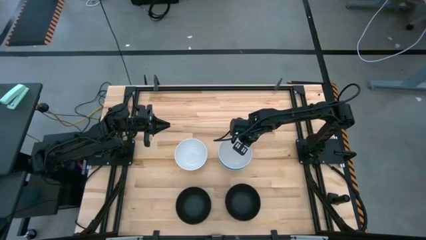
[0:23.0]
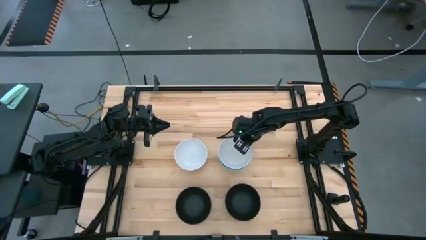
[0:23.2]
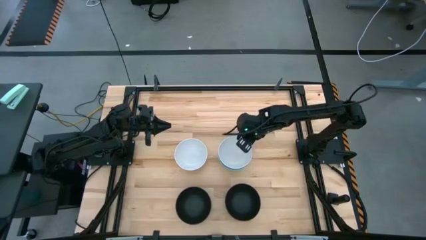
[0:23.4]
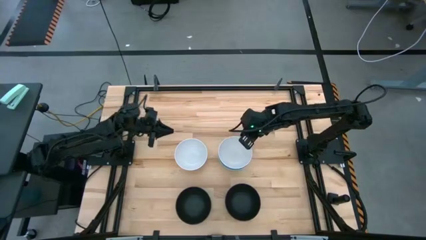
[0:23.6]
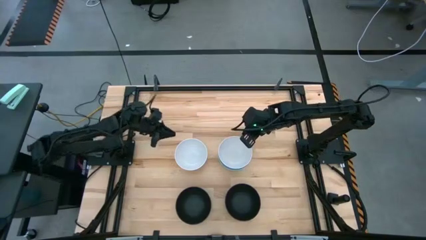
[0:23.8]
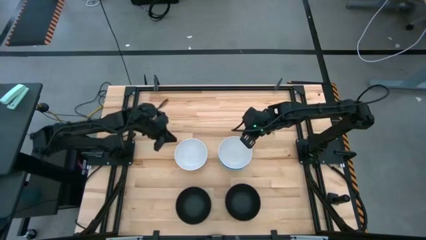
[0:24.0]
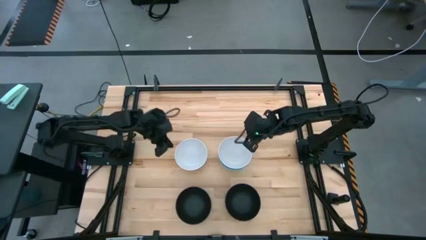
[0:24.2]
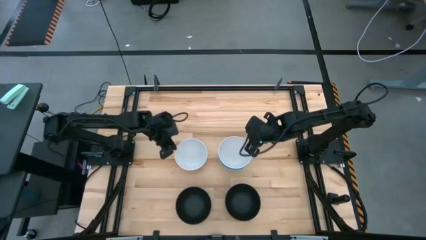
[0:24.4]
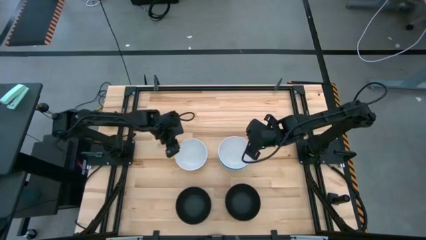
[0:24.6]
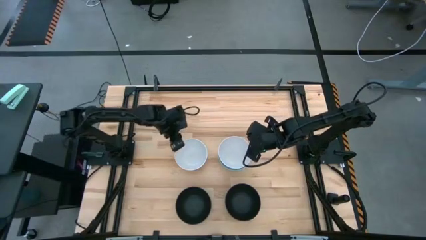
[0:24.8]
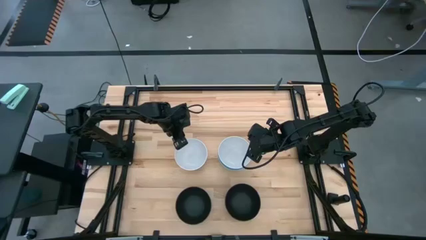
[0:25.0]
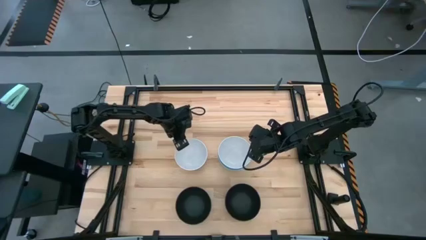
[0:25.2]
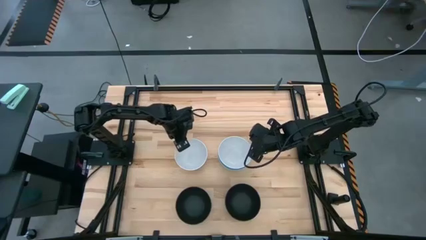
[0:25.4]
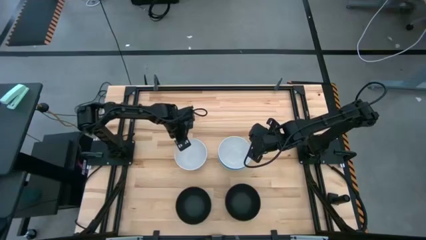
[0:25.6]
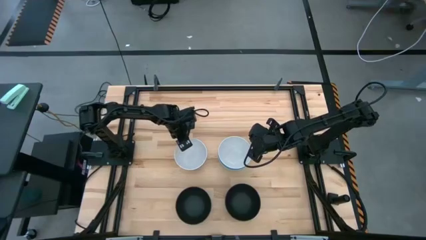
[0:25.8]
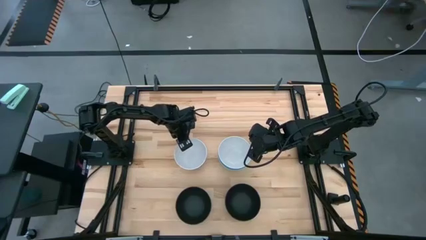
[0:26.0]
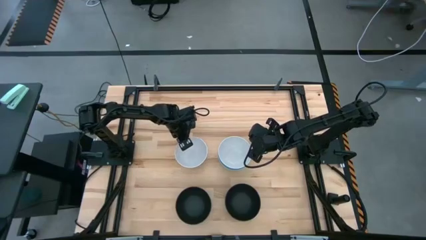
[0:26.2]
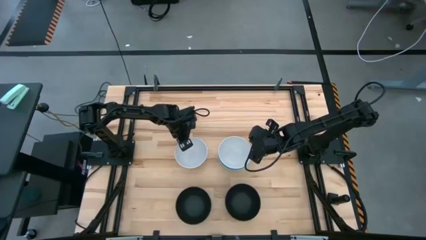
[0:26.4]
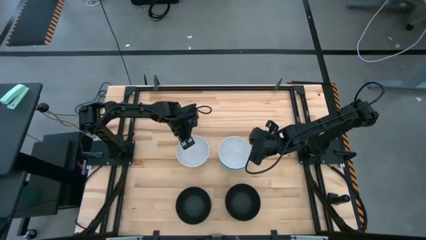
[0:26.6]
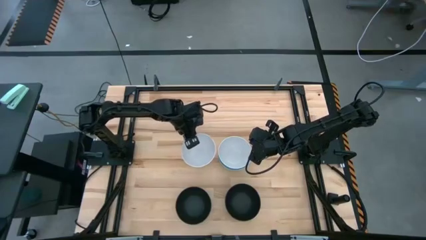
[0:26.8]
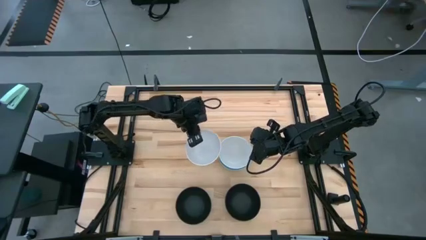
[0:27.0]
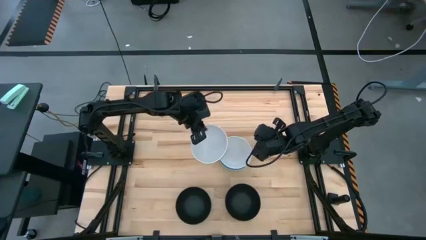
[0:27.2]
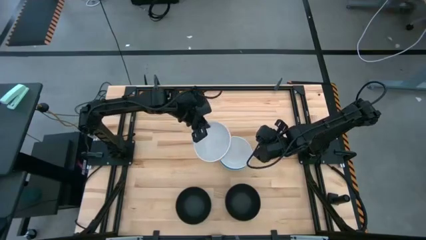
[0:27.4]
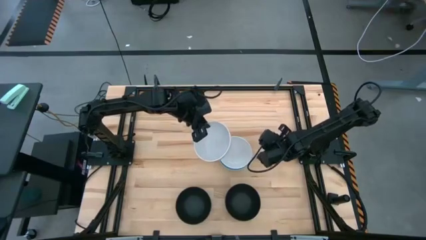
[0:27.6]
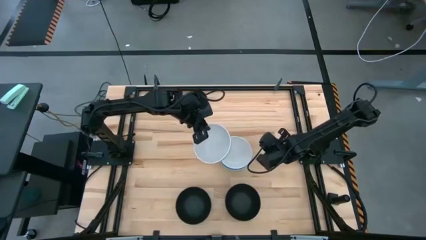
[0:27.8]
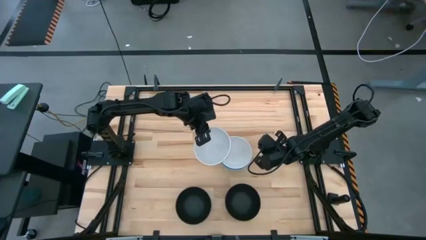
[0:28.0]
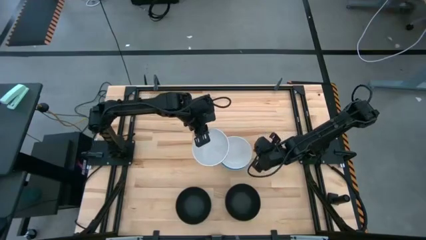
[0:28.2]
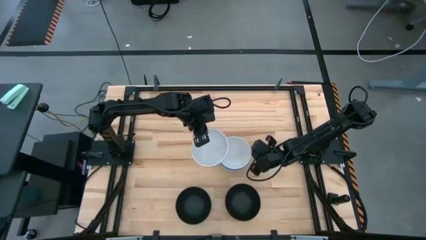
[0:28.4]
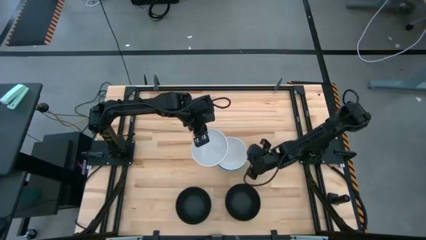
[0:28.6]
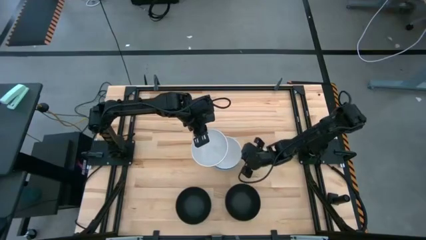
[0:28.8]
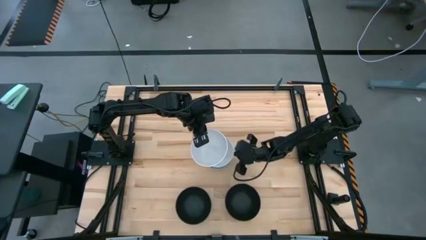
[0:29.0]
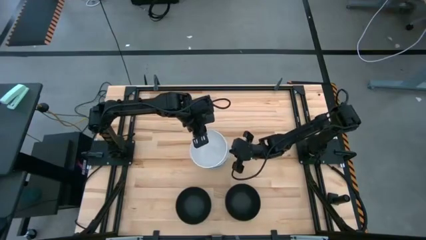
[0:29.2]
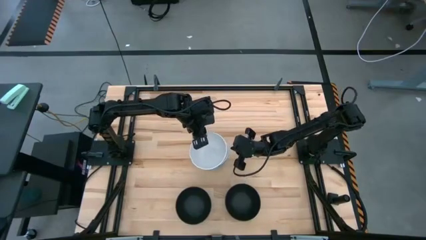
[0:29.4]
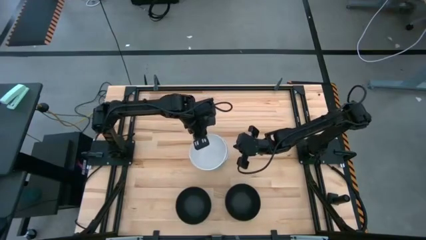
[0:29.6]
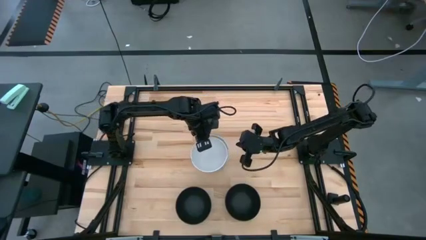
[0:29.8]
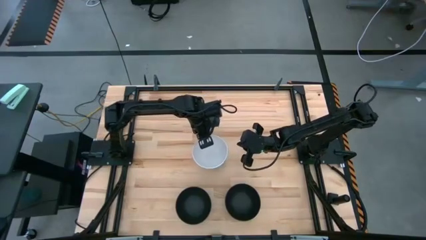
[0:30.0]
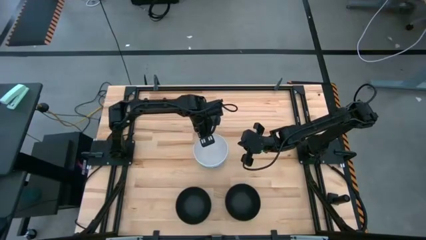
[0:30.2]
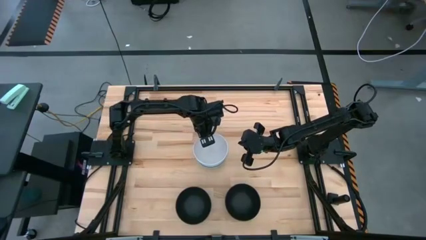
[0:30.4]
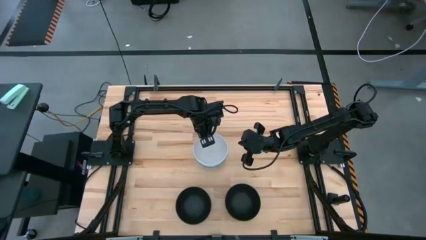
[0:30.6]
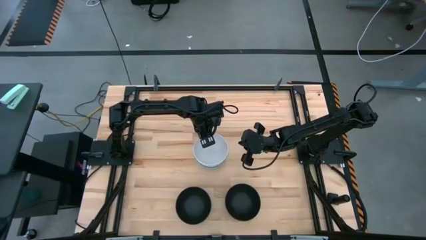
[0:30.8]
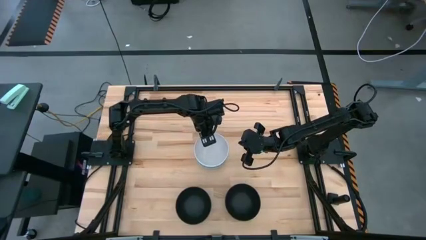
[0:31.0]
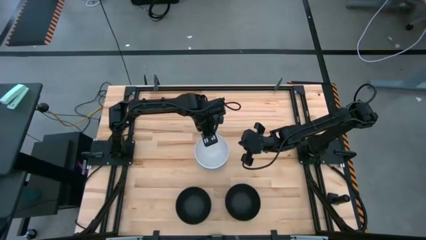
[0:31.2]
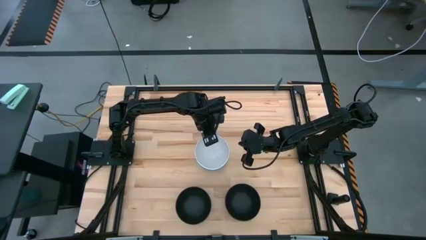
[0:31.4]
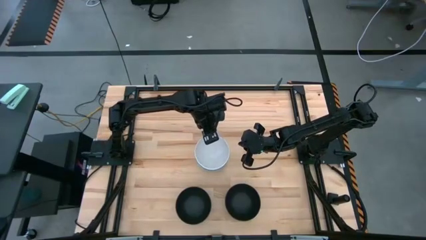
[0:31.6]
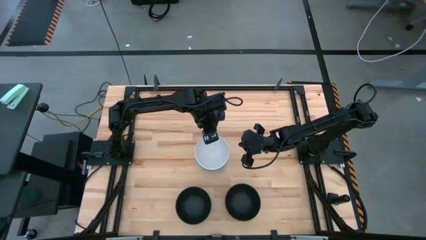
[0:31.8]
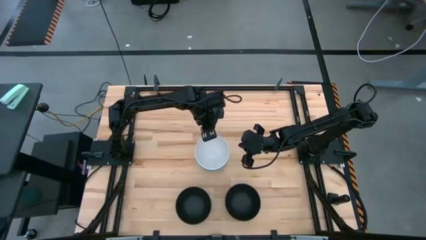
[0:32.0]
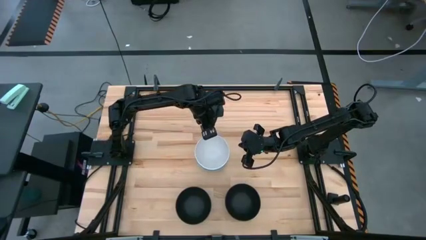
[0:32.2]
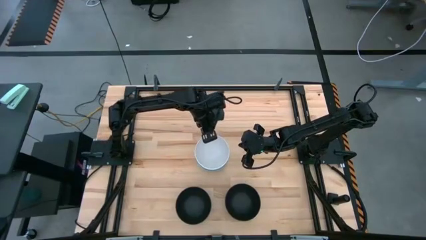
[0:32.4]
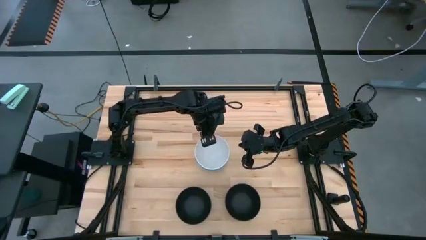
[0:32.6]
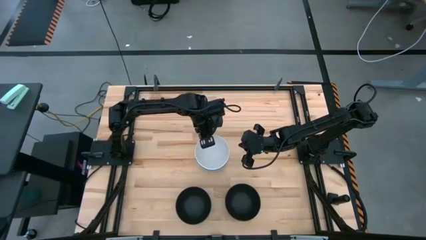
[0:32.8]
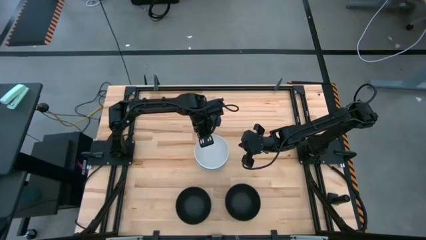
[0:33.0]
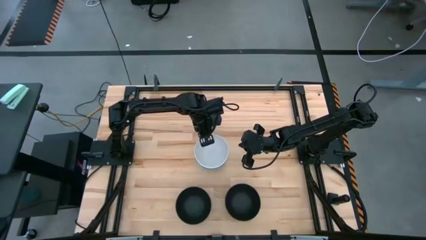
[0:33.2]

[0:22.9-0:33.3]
Task: Nest bowls inside each other
Stack the white bowl on the stacked white bowl

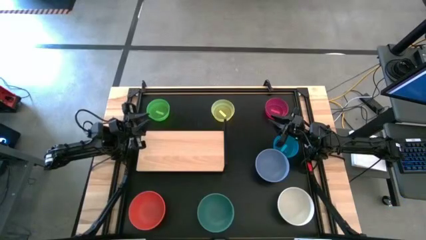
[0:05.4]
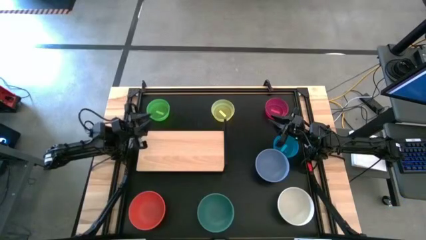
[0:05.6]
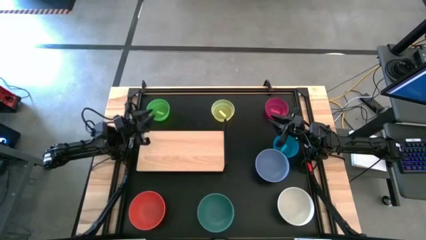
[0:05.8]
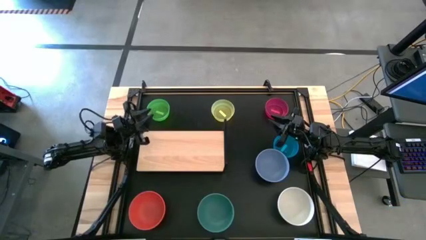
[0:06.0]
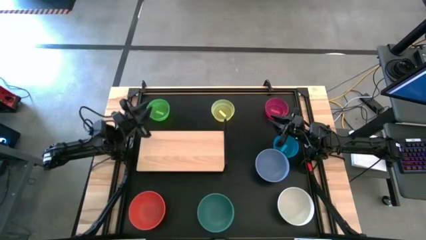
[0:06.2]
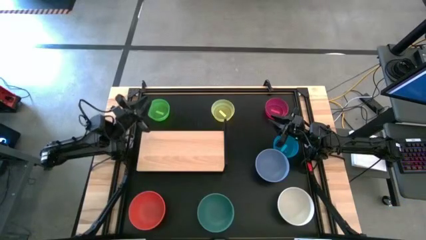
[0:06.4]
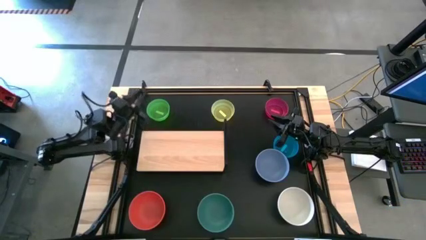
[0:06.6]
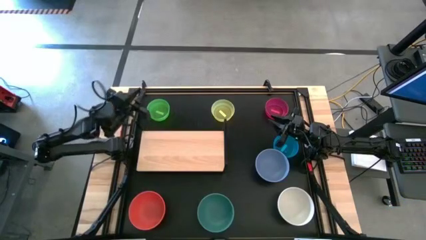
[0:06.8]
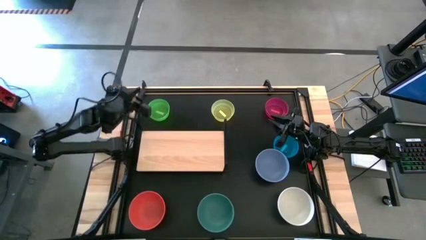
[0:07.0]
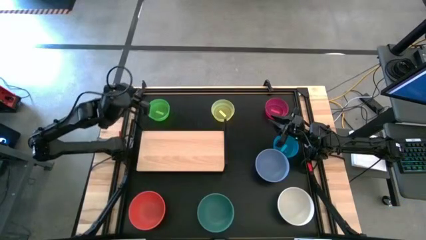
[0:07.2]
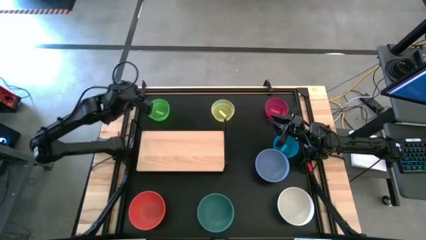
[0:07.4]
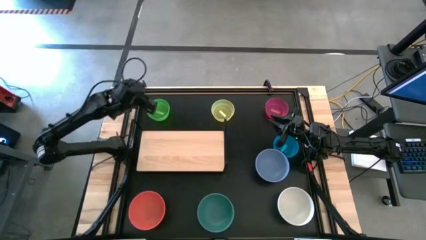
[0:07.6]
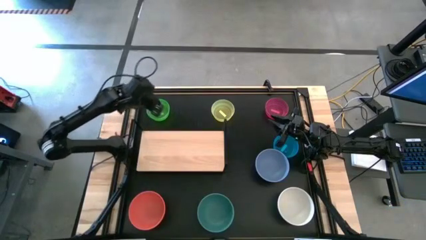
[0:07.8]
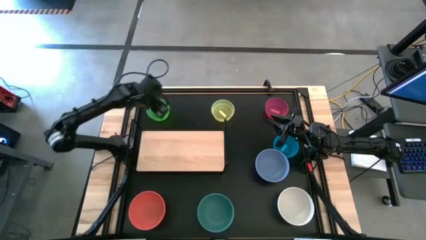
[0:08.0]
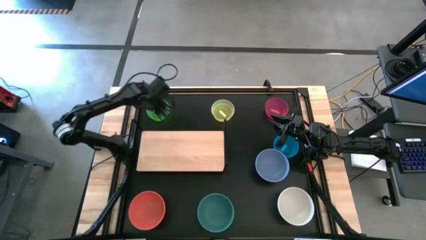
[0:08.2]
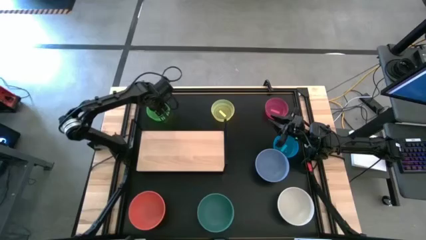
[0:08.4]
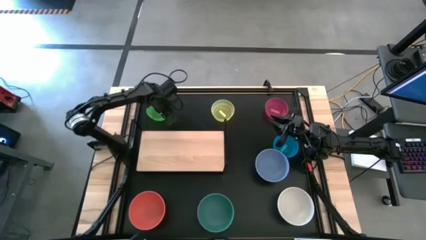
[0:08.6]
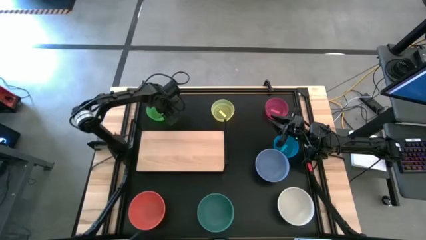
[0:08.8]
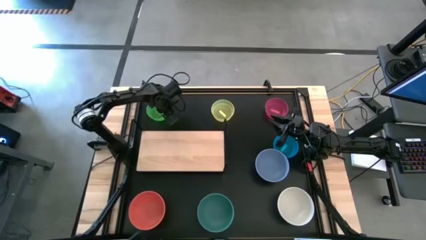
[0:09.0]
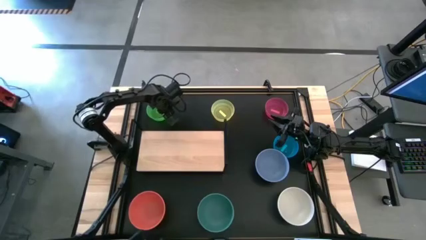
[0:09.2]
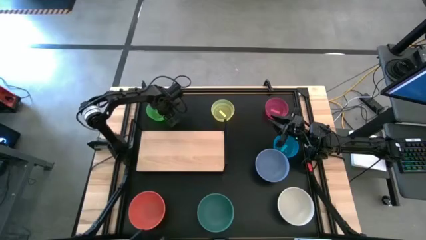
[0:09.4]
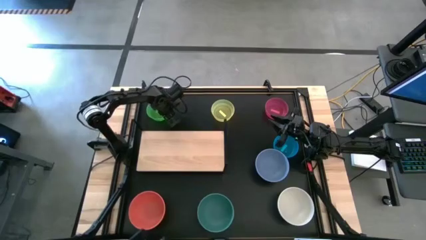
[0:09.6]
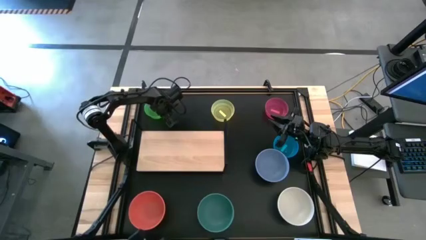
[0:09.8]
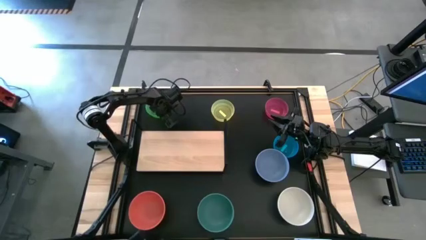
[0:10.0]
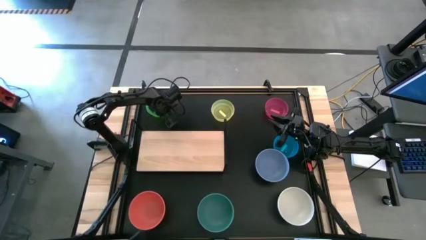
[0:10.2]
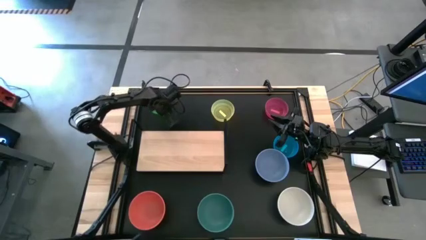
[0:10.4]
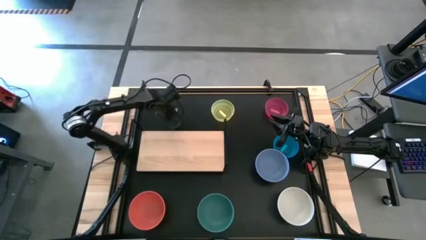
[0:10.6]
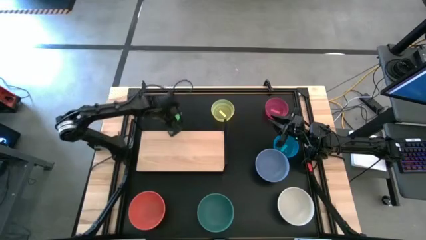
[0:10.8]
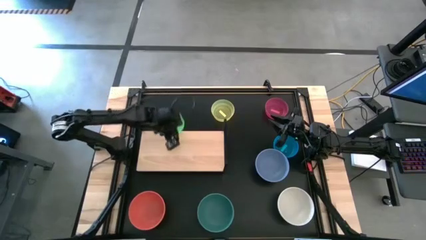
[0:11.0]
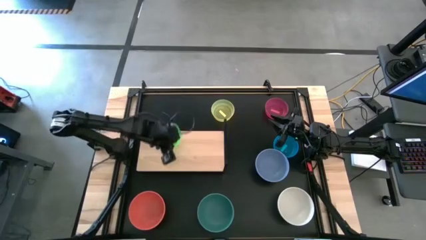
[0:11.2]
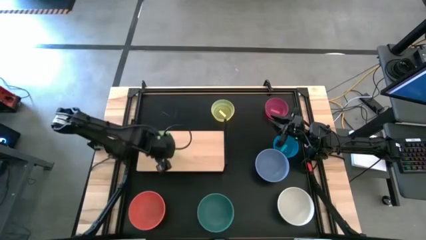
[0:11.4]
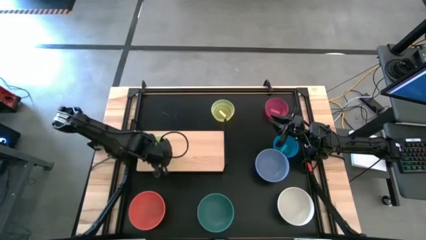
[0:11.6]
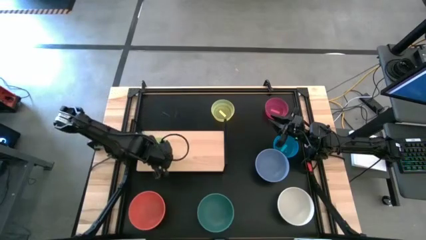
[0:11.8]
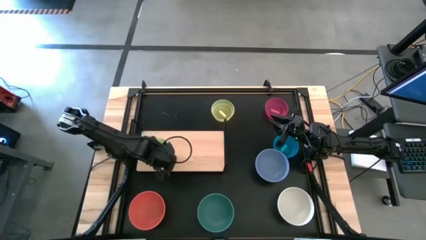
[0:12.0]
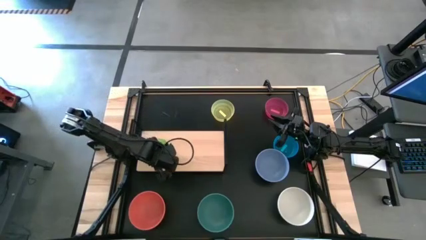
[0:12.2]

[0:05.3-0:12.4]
Task: Place and stack bowls onto a shelf
Put the small green bowl on the shelf
